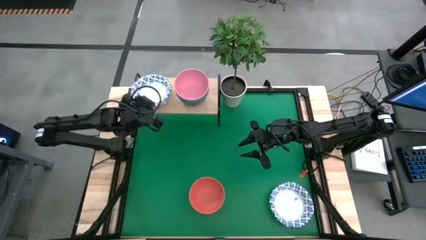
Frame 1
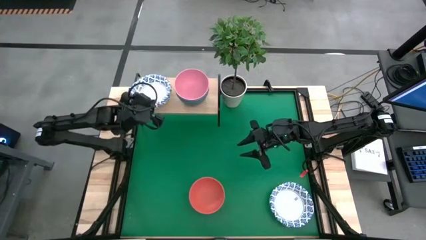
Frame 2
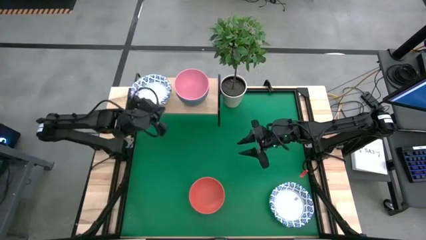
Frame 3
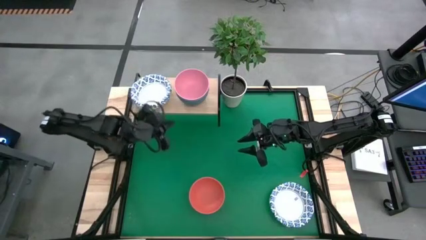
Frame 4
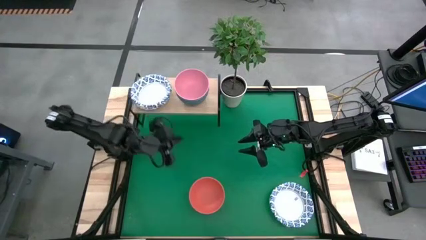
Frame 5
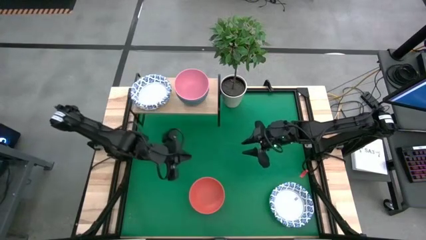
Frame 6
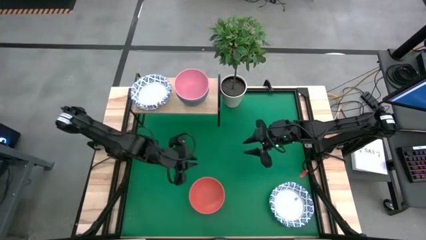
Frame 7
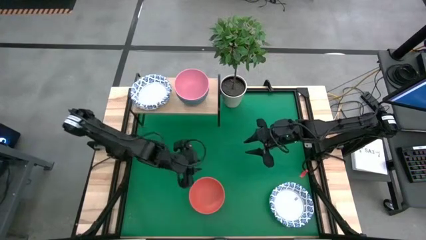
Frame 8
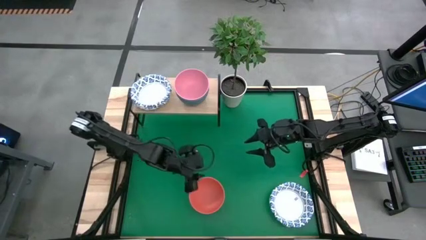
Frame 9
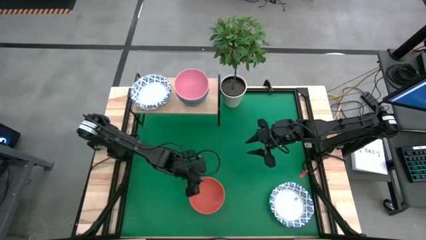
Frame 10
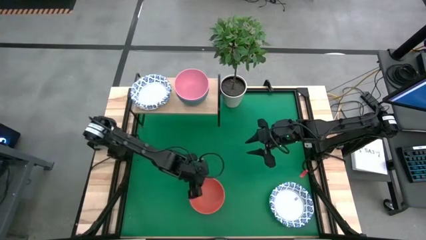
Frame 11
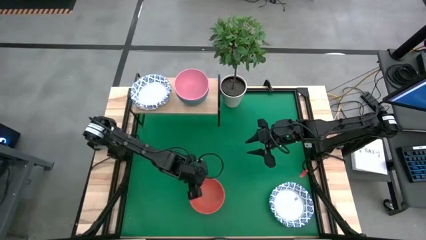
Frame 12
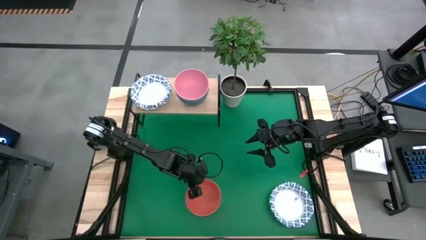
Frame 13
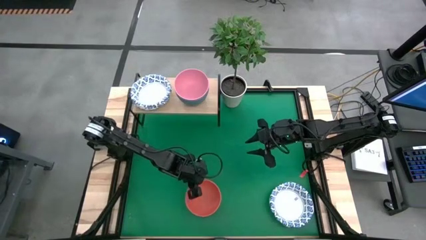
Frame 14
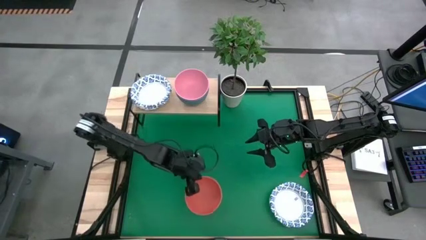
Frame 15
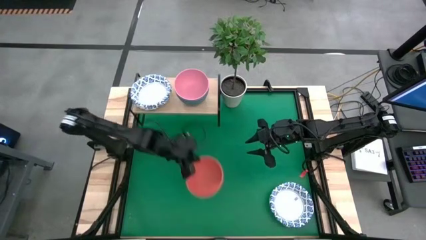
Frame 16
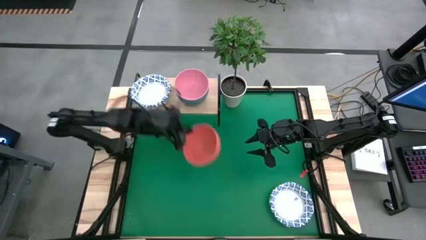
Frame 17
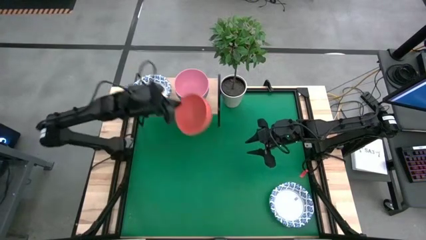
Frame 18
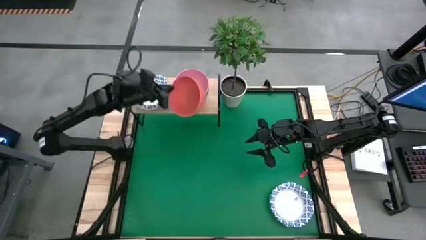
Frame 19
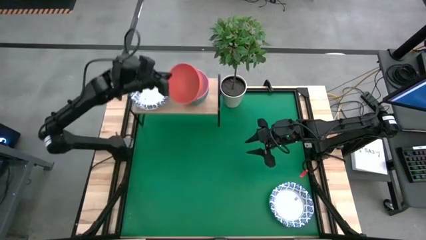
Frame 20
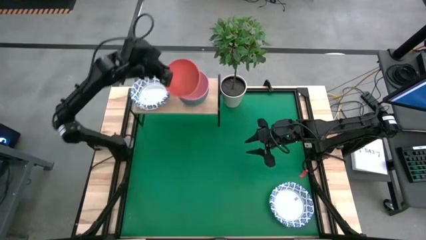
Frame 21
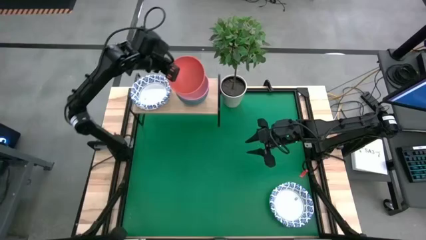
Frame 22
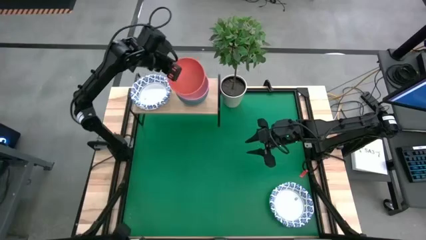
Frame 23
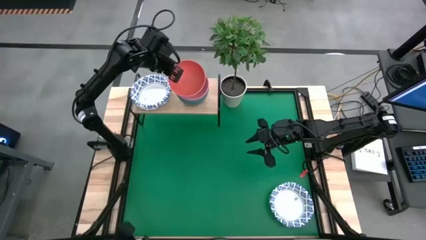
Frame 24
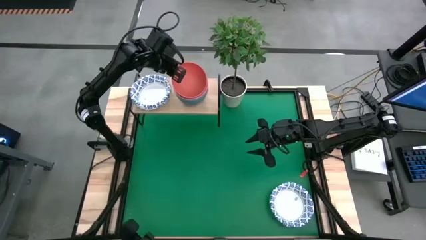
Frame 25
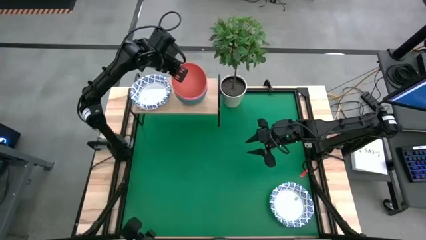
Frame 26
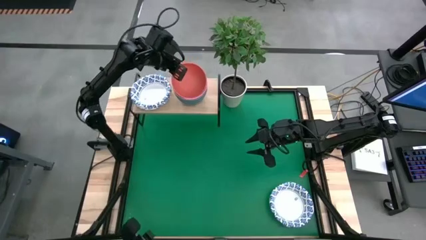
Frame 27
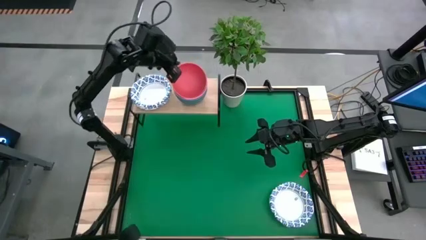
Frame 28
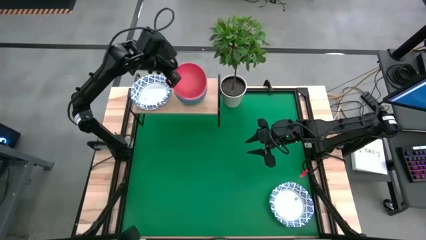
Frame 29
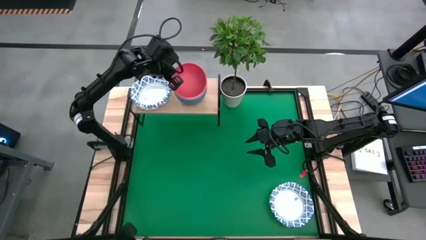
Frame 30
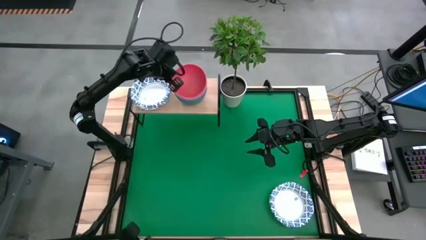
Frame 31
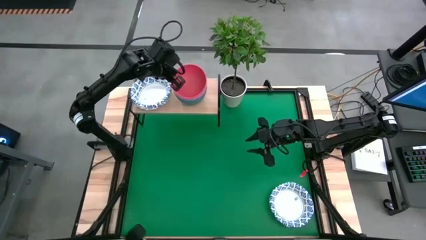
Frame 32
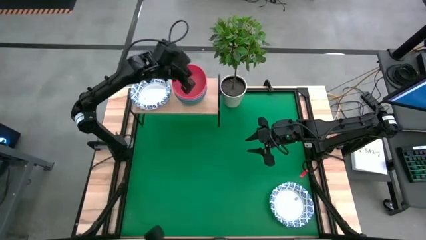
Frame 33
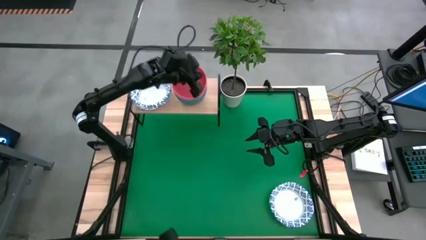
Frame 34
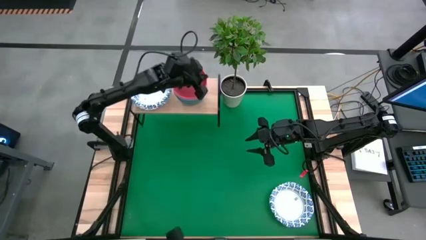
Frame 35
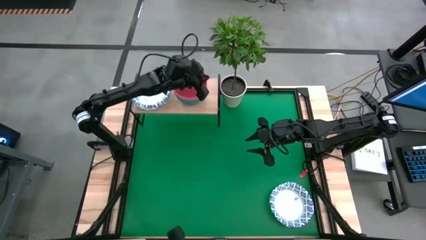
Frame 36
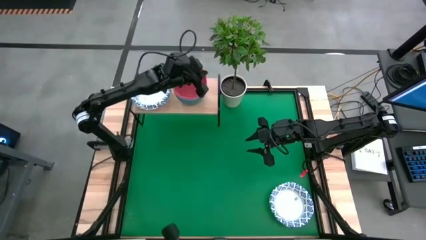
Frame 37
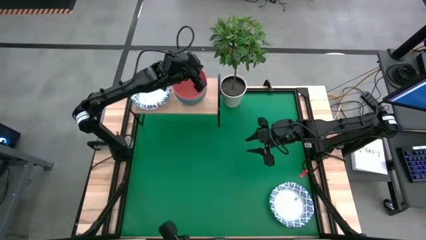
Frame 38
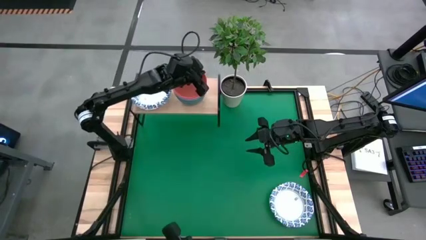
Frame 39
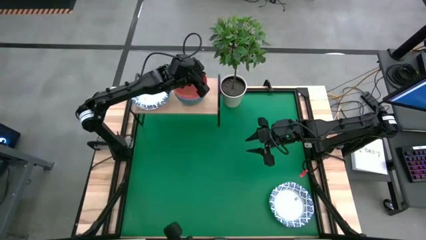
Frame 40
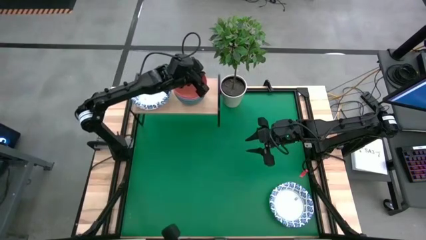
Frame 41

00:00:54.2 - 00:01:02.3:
Task: Place and stack bowls onto a shelf
Stack the orange bowl on top of the pink bowl on the shelf

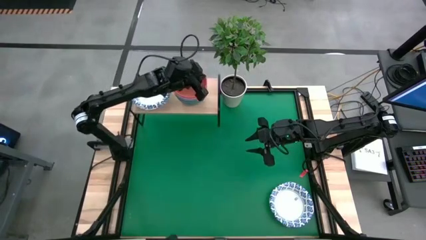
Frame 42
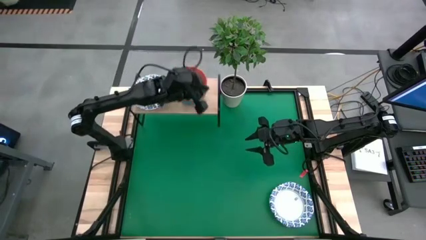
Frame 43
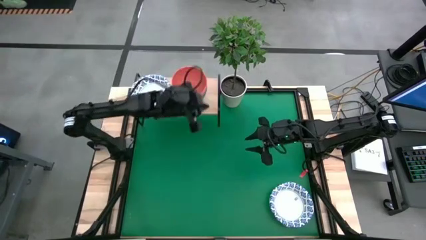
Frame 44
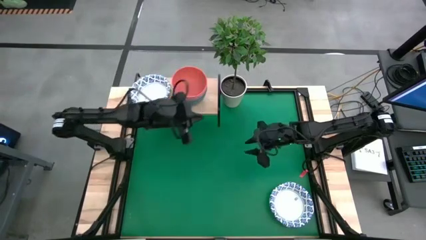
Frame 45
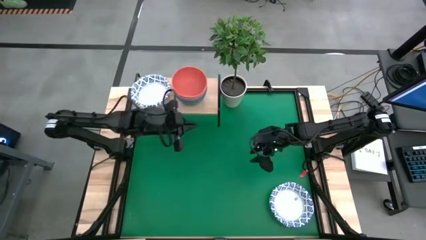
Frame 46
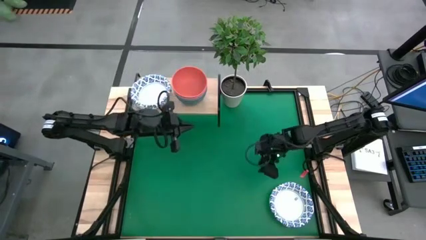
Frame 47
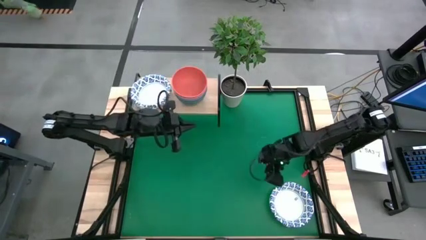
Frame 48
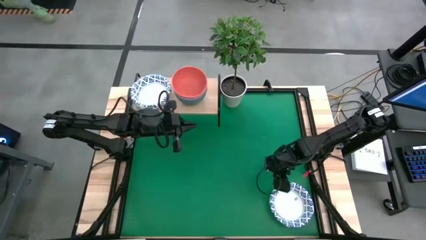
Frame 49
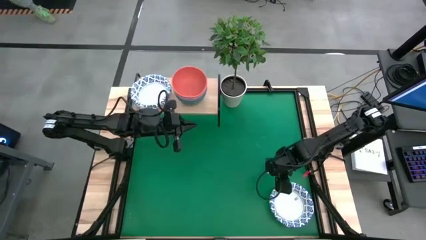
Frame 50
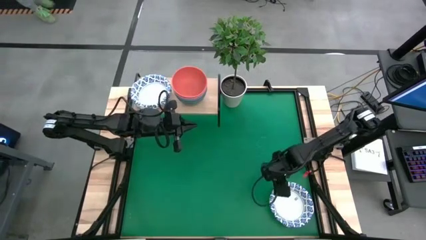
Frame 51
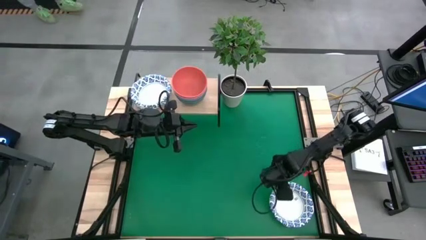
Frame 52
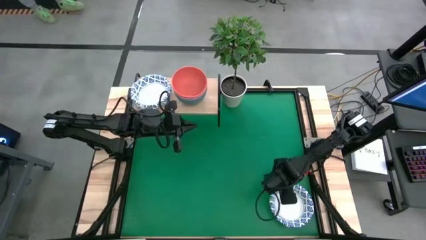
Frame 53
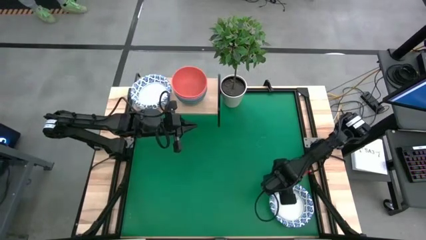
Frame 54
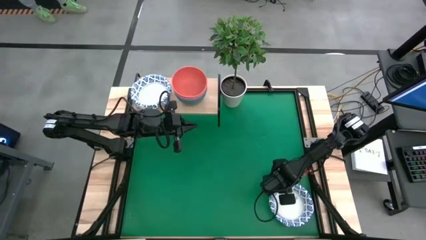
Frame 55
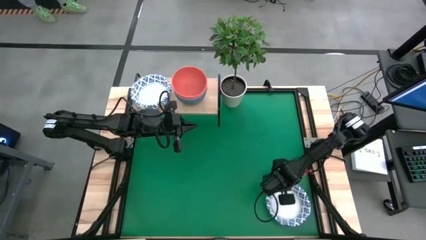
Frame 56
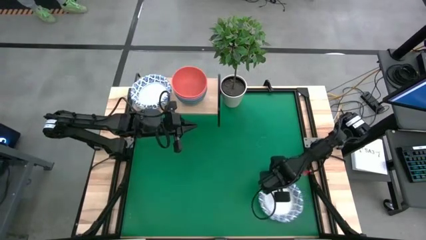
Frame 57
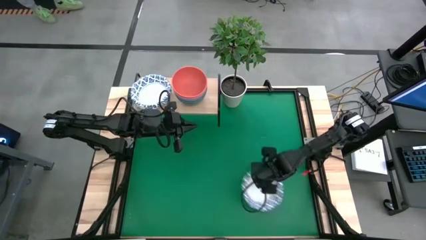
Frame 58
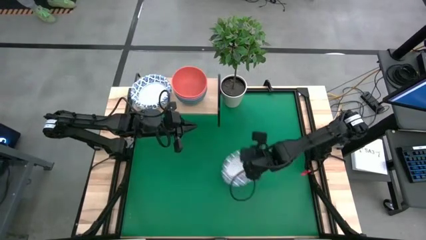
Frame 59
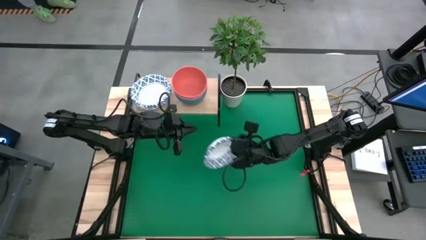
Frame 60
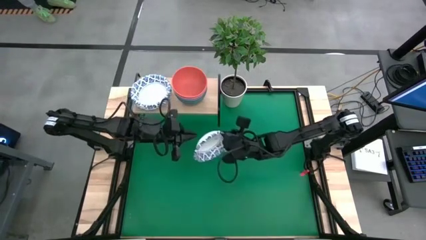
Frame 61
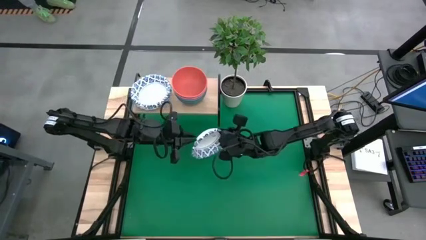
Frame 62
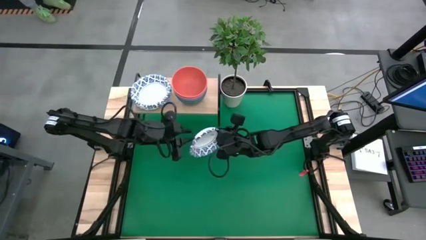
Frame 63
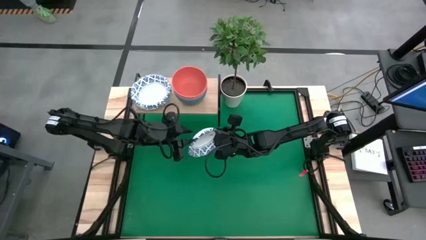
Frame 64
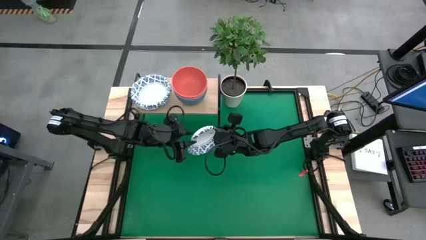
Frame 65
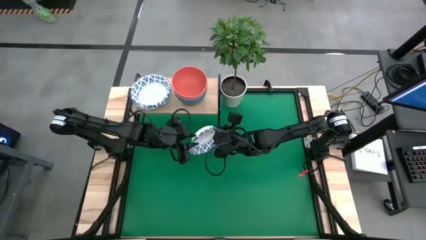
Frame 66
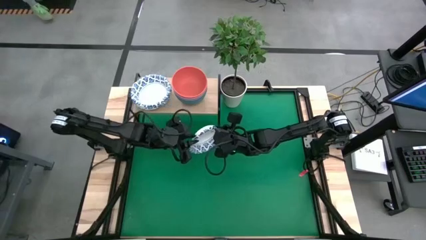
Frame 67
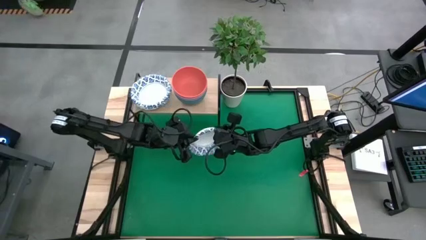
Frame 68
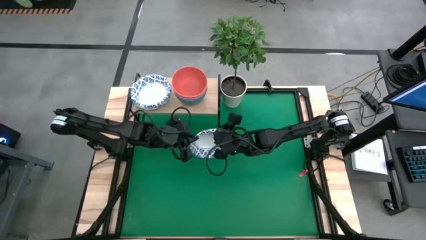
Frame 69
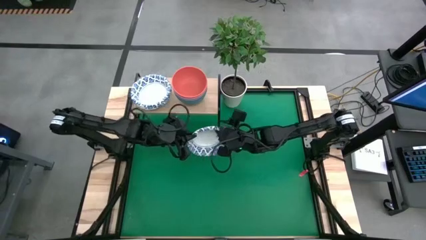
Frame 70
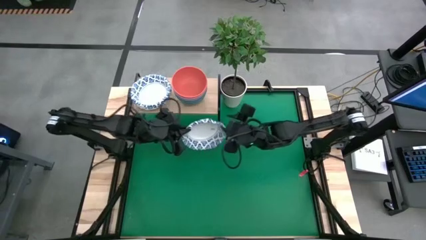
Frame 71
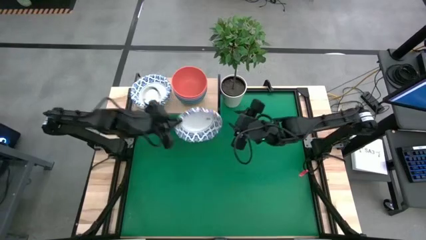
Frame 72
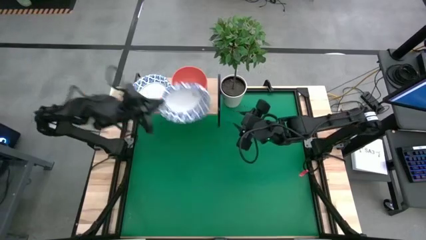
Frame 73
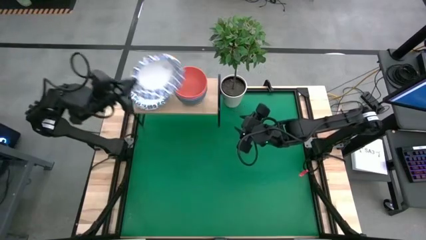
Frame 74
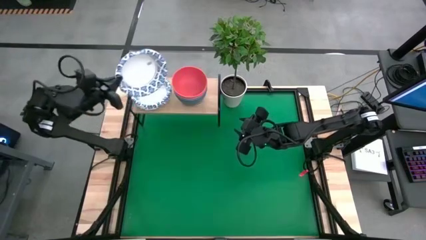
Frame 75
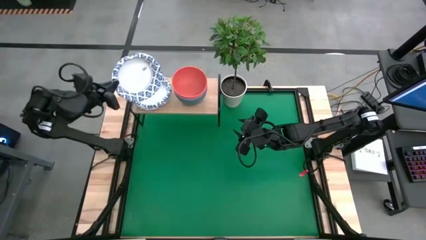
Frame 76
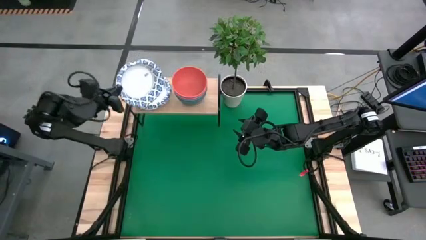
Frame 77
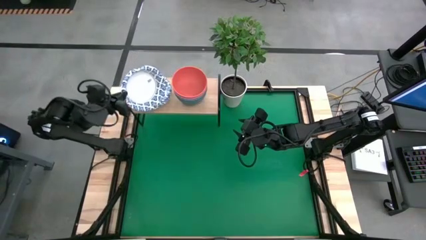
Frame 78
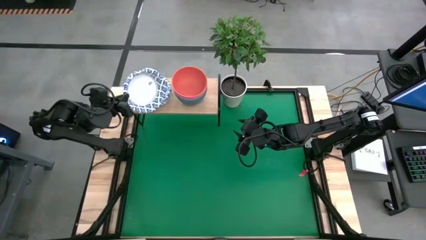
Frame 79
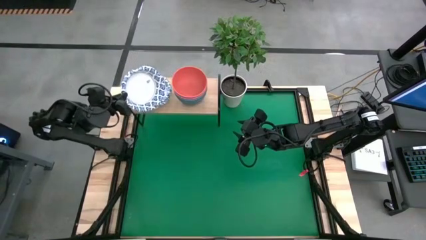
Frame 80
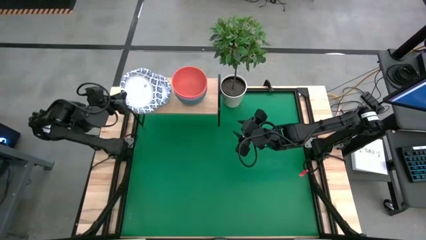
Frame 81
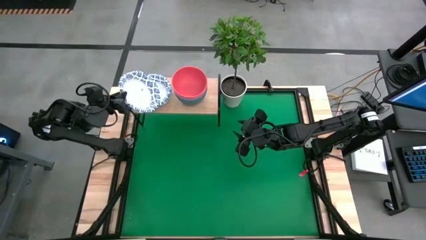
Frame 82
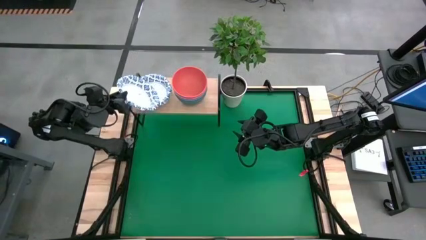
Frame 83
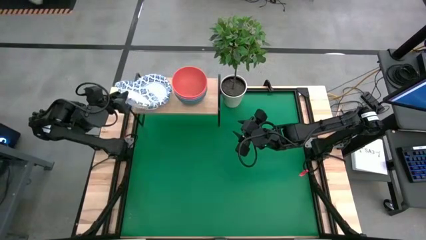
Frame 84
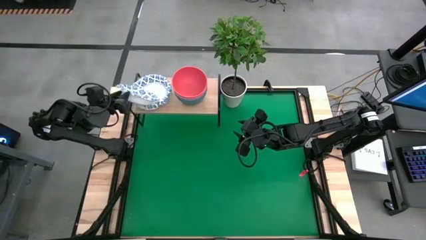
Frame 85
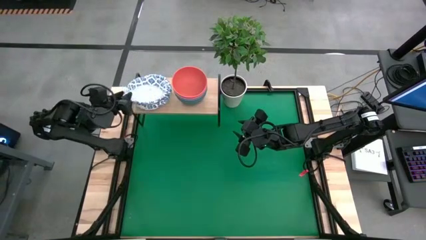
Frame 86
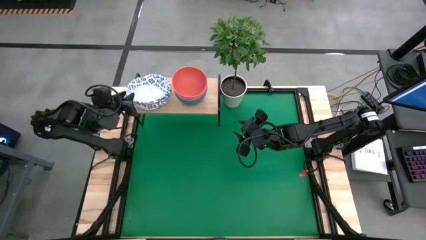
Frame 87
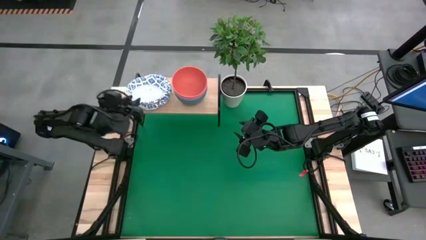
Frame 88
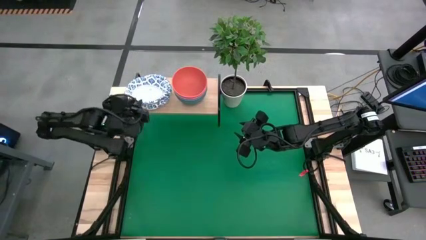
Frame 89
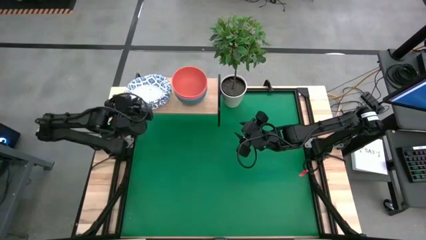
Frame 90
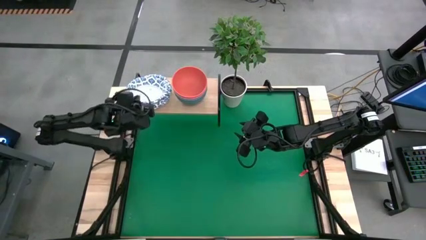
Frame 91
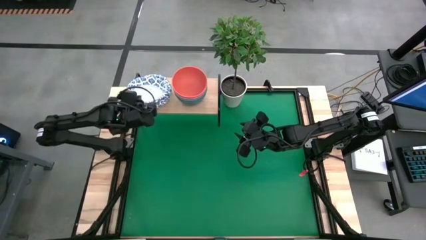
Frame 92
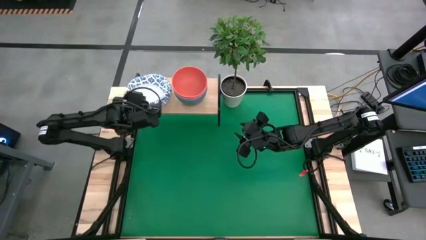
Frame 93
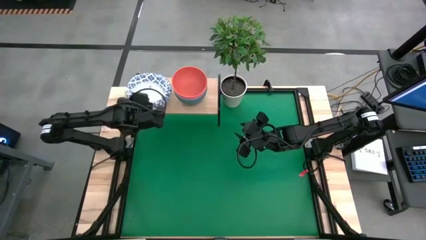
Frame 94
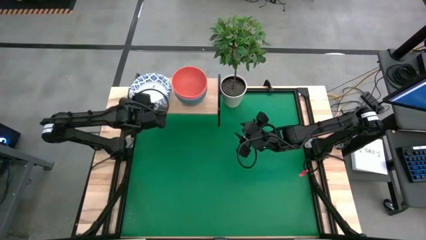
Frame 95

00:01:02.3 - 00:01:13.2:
Stack the white patterned bowl on top of the white patterned bowl on the shelf
